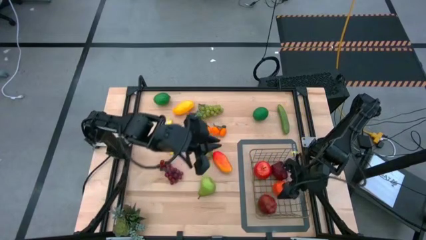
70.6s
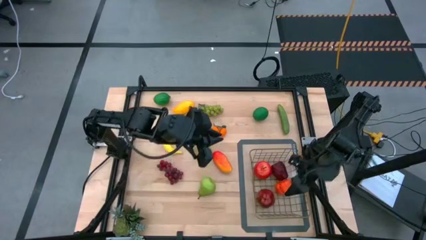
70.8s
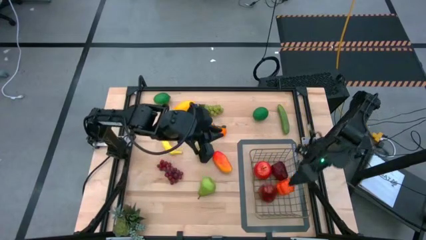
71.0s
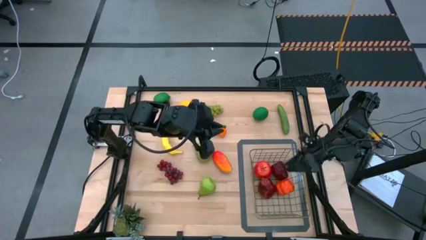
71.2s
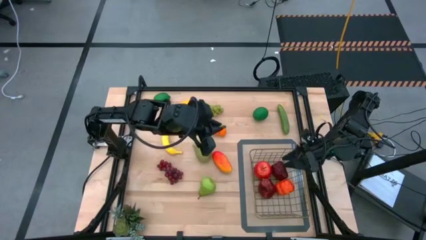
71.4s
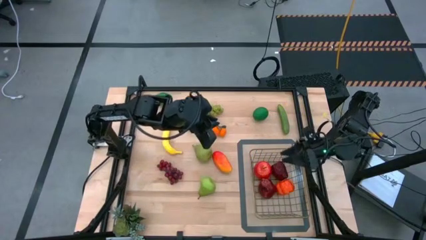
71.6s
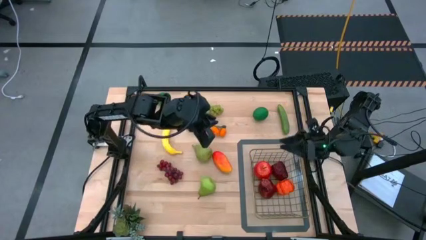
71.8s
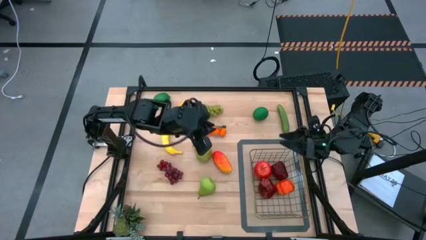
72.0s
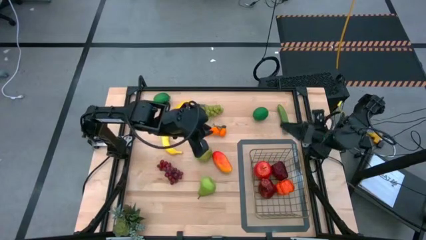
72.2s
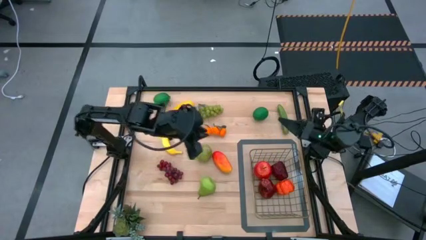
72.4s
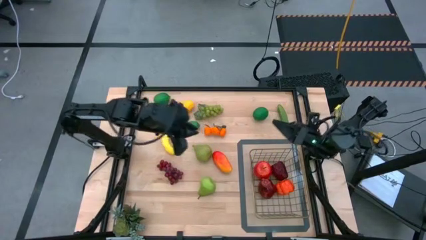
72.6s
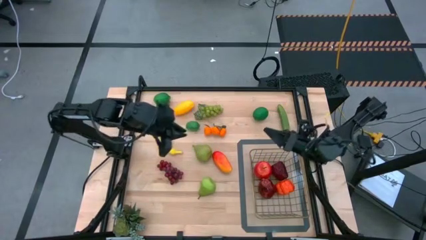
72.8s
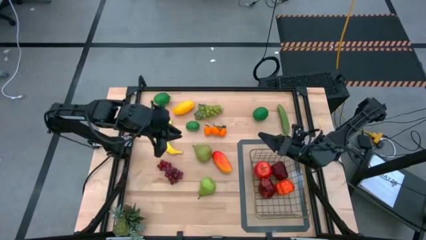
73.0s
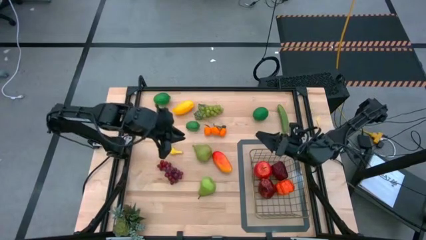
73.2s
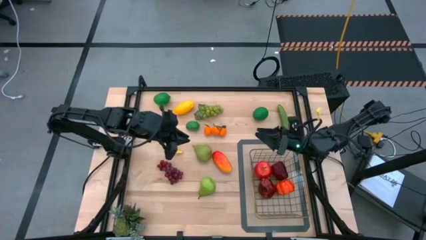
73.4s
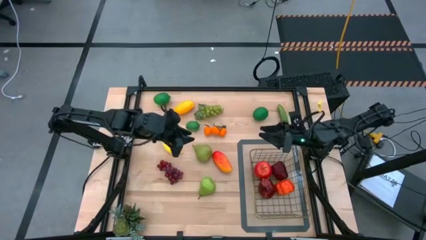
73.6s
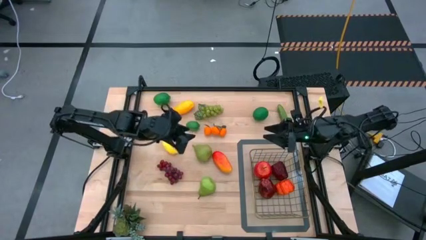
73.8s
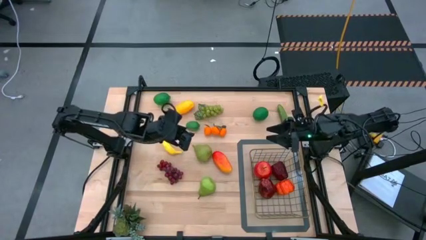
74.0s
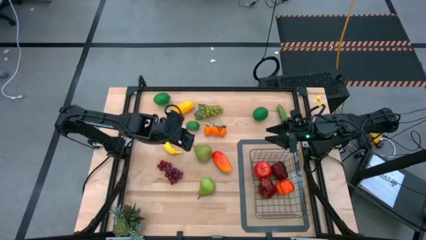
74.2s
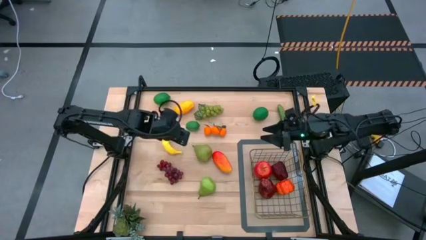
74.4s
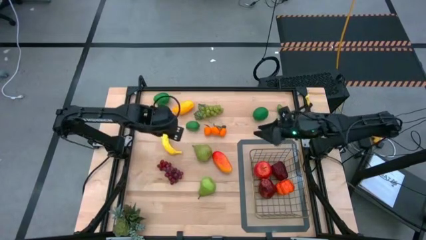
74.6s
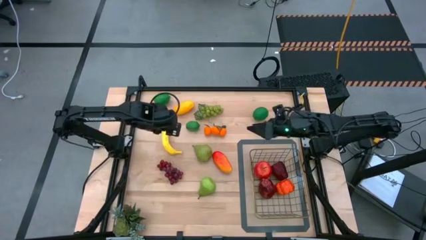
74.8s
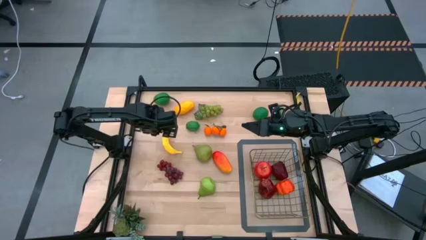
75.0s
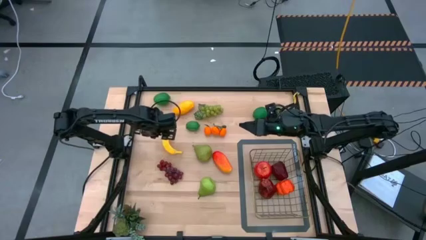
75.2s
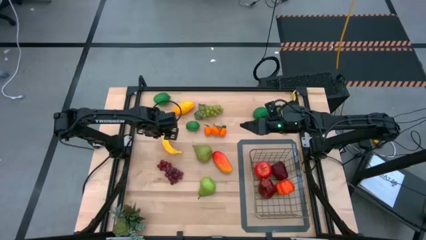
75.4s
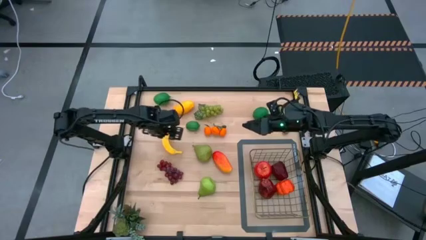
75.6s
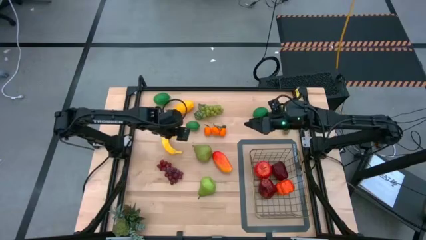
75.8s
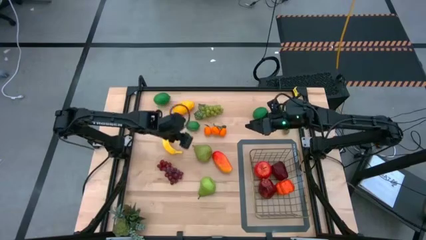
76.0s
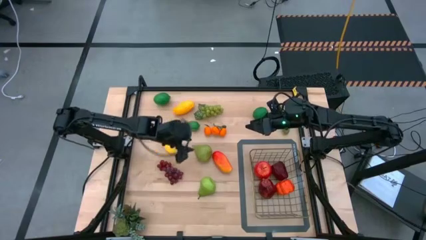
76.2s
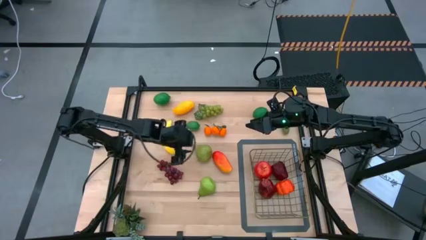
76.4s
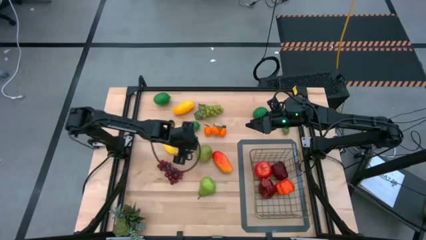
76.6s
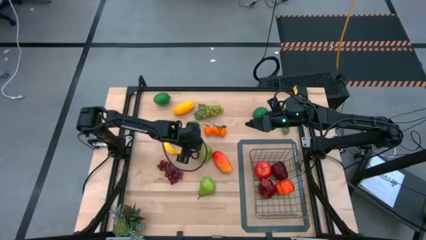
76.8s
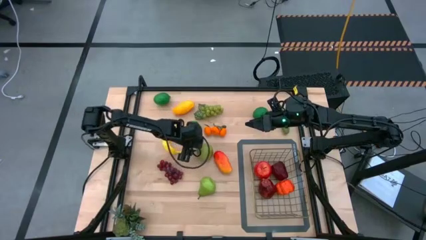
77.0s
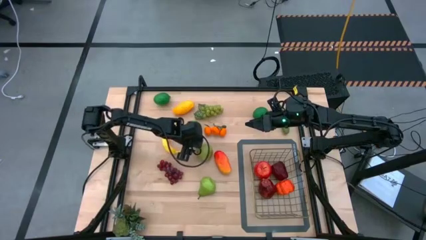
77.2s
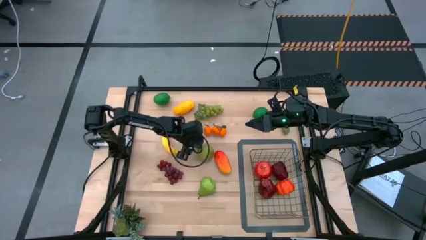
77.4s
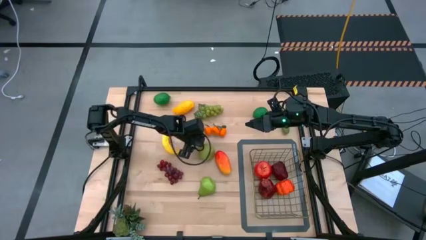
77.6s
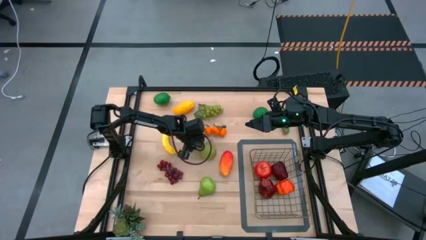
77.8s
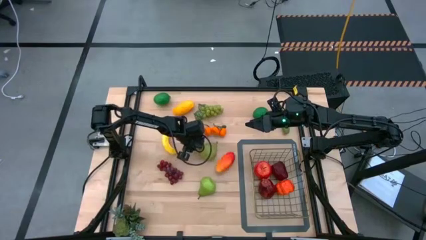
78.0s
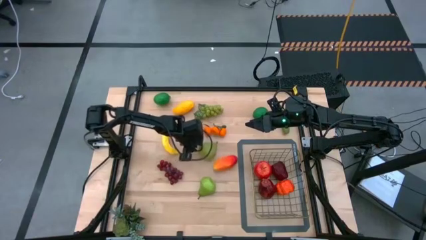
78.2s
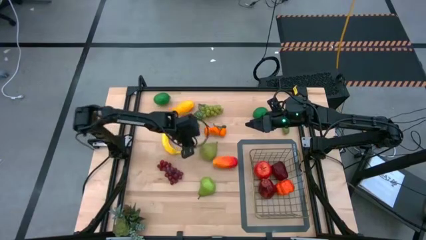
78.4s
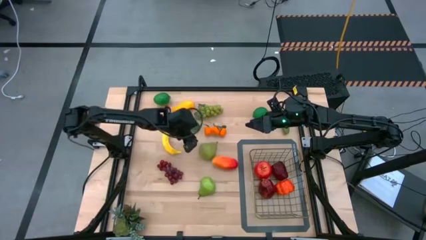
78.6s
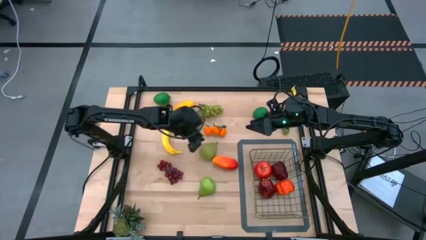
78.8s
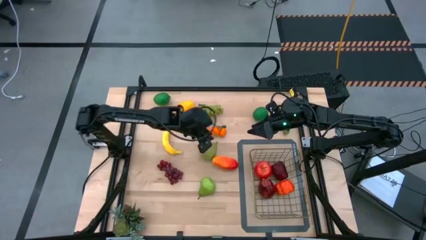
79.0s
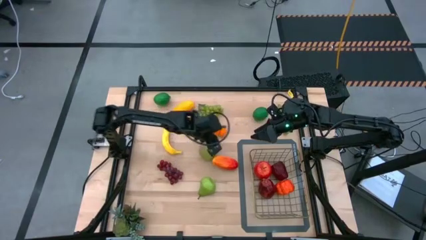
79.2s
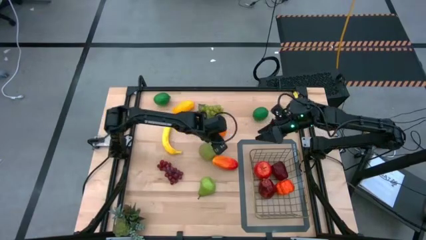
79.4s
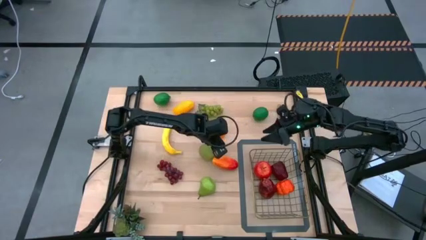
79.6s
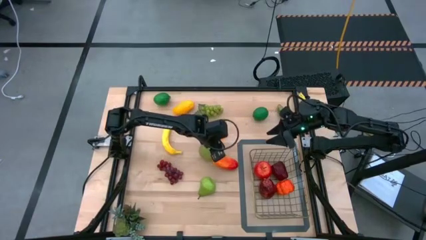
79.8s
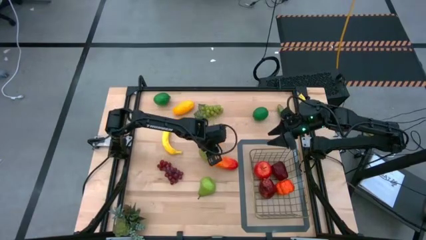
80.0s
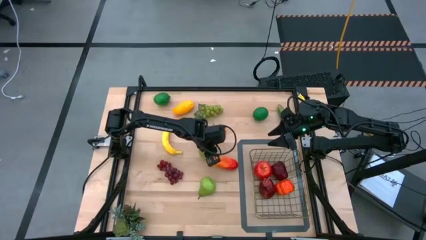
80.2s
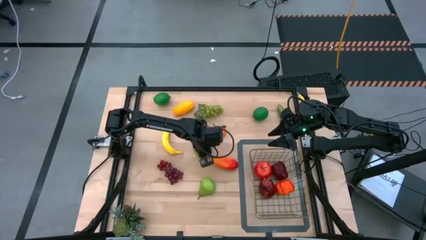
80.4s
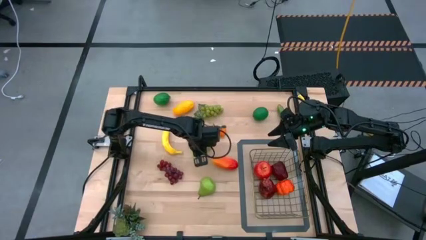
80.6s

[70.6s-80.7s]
Task: Build produce basket
Put the top green pear into the wire basket

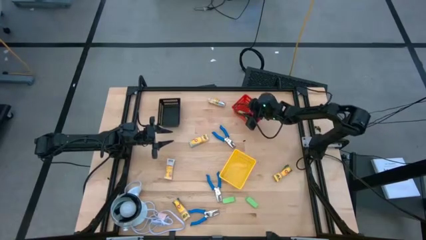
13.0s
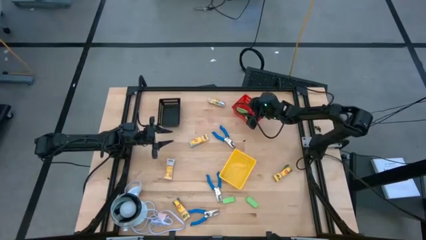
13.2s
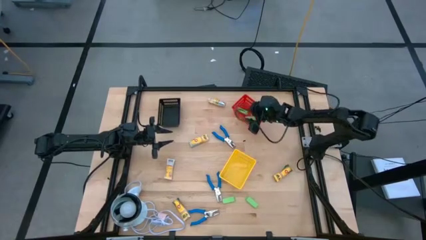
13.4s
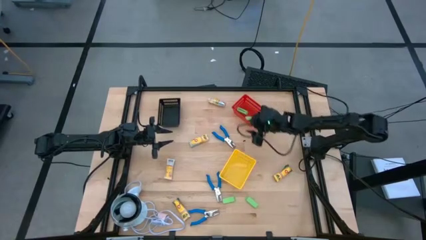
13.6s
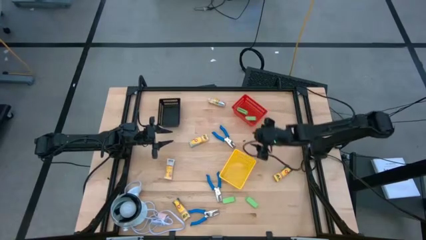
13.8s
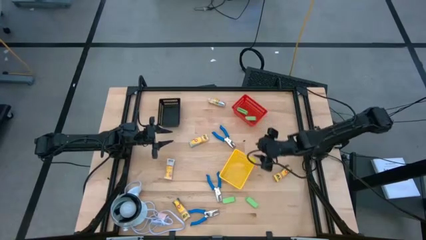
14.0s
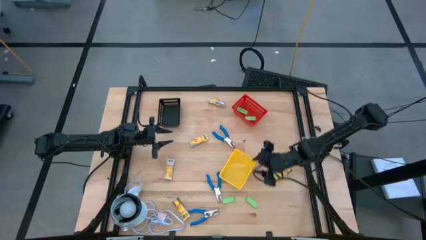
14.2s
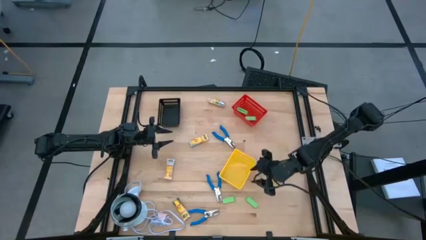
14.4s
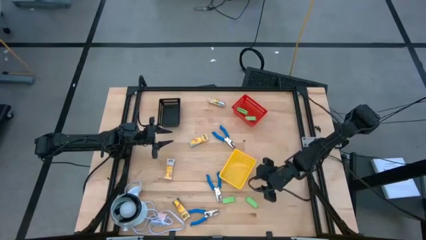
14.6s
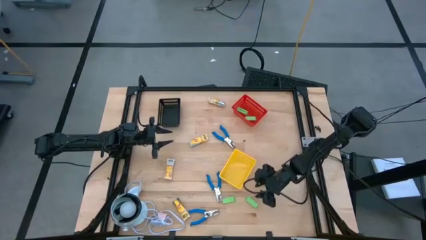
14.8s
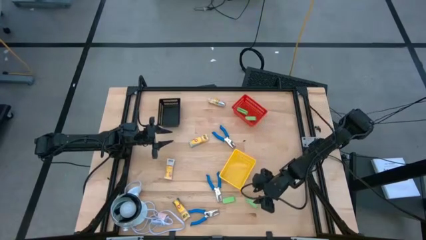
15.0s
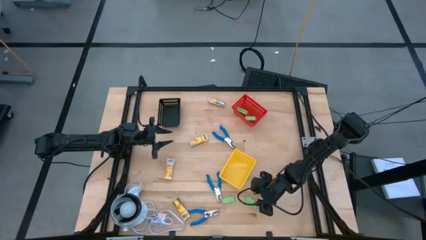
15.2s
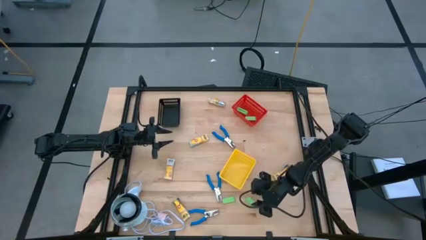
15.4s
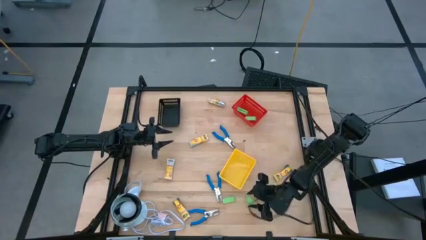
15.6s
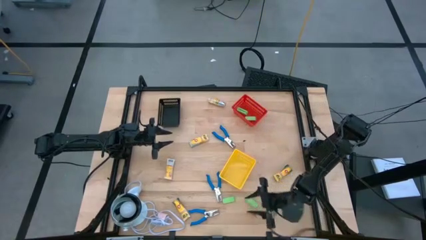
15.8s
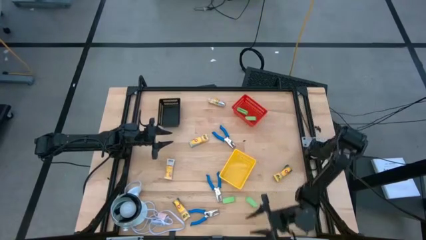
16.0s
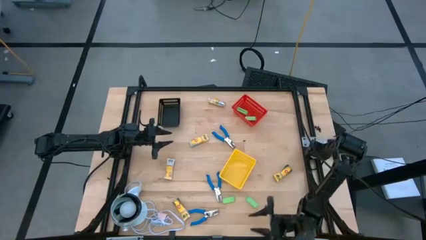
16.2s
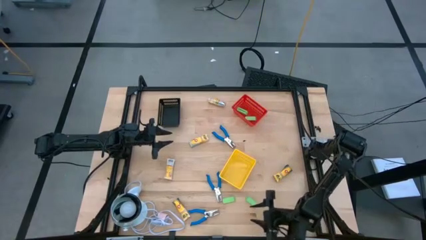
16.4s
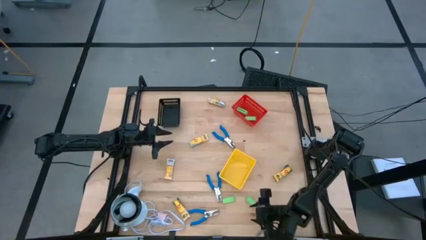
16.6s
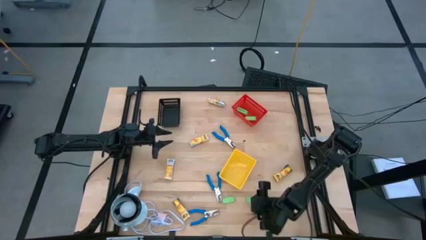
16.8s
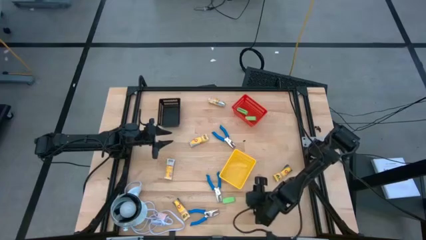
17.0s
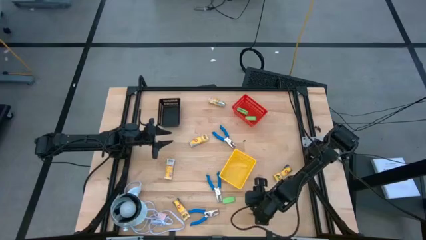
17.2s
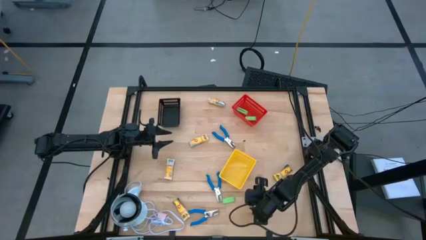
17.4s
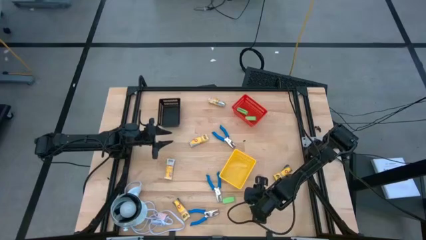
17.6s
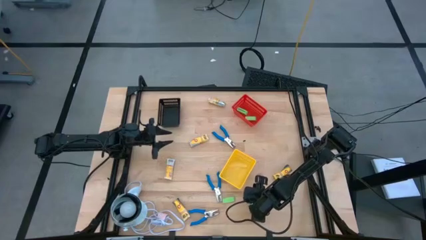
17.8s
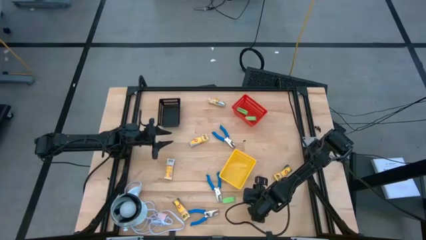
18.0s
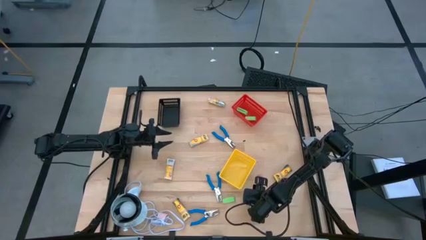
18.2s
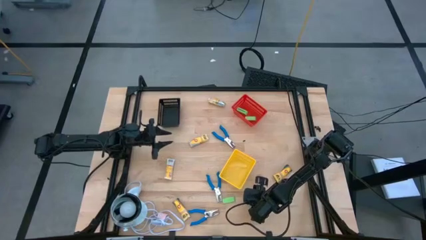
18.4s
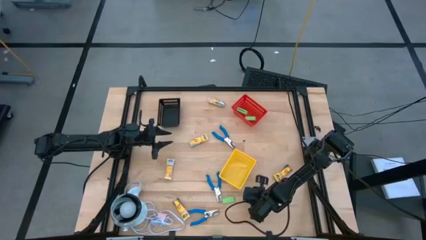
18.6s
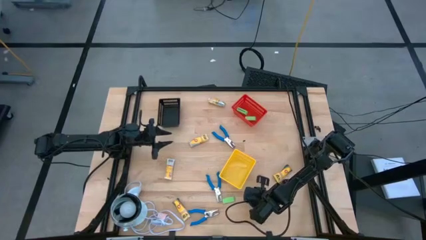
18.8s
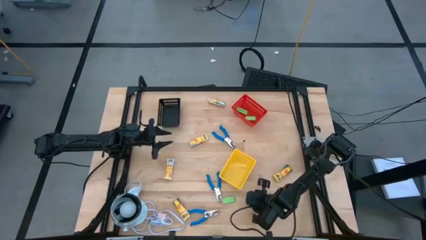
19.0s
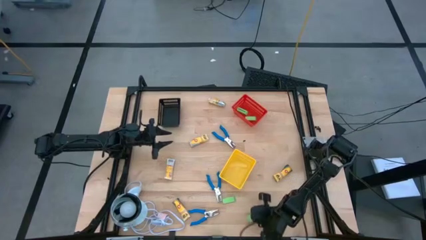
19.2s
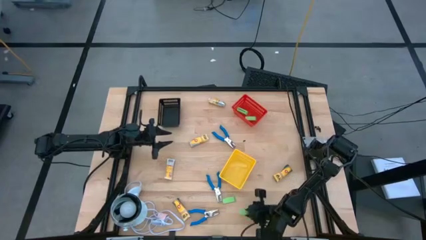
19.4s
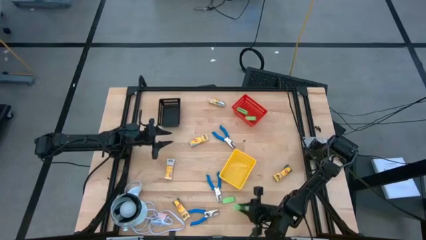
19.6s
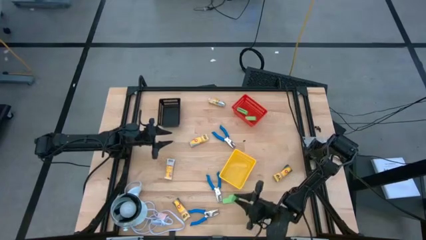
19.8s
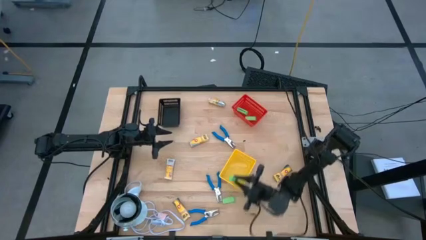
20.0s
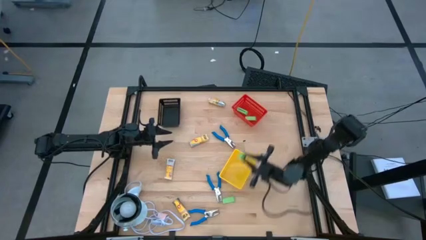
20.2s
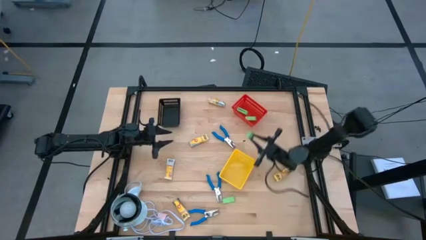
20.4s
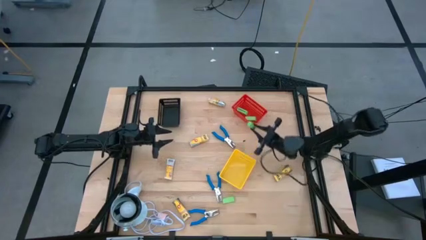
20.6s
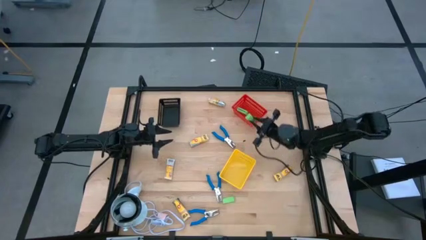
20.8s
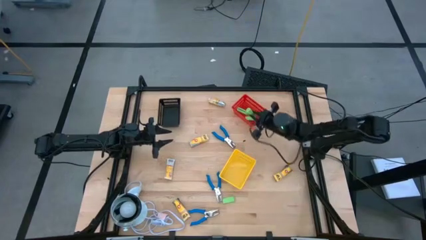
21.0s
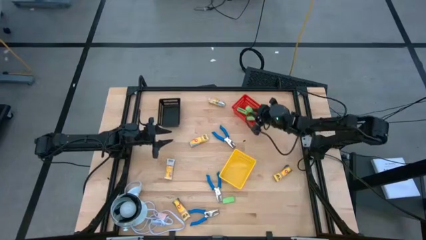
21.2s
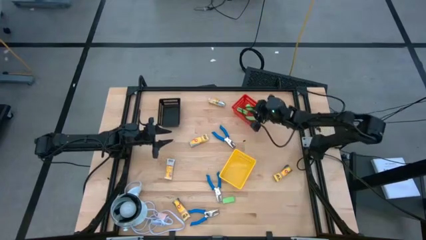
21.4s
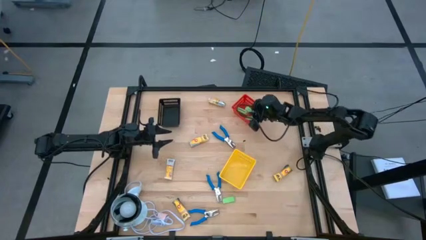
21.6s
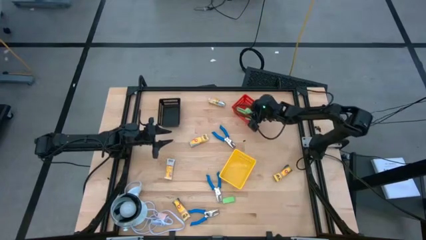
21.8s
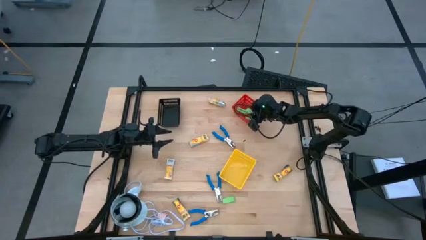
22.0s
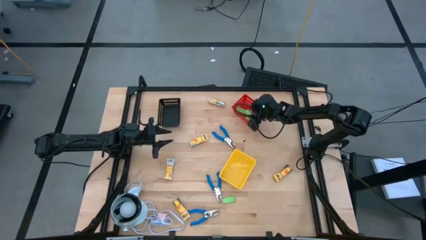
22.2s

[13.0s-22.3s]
Task: Pick & Place School Supplies
Put the green eraser into the red bin
